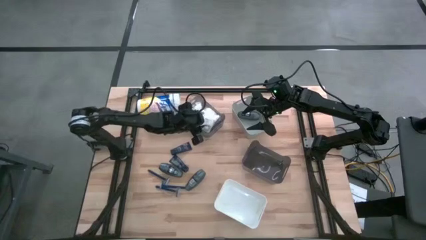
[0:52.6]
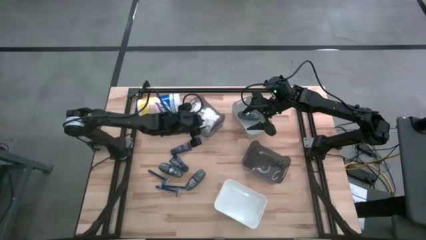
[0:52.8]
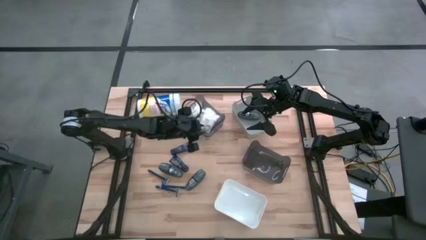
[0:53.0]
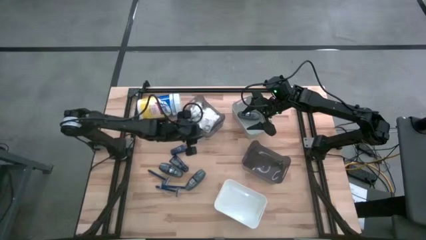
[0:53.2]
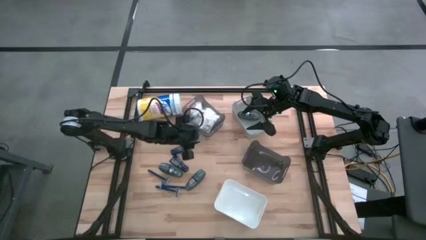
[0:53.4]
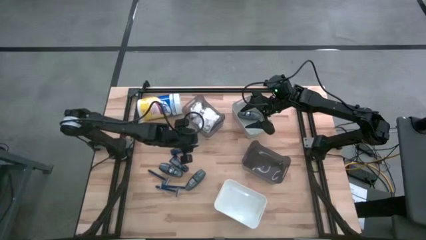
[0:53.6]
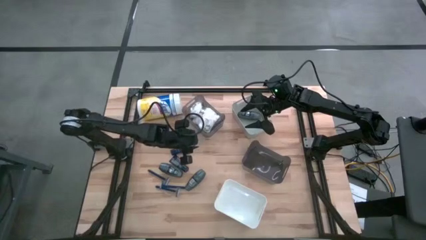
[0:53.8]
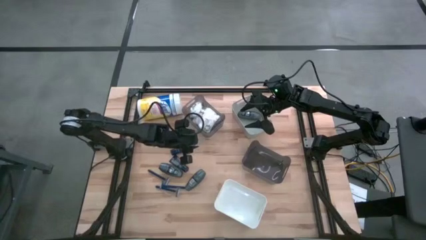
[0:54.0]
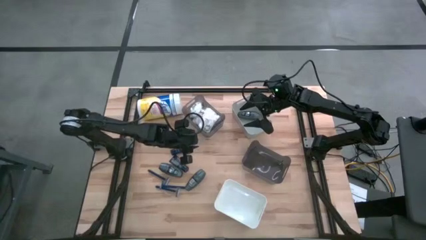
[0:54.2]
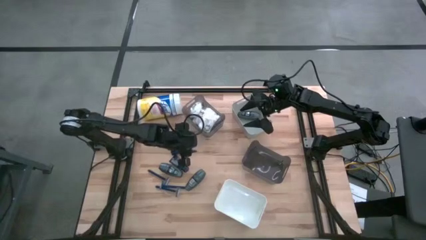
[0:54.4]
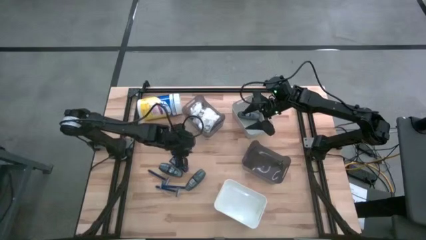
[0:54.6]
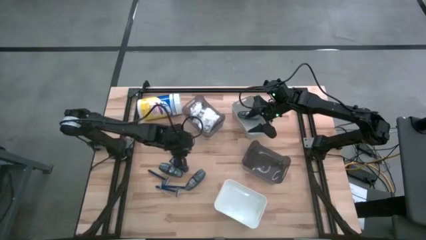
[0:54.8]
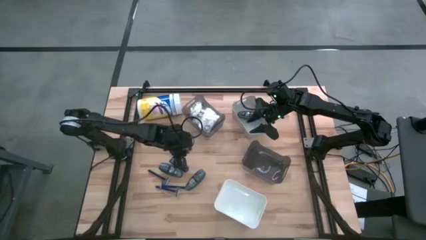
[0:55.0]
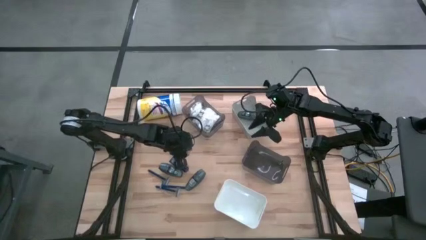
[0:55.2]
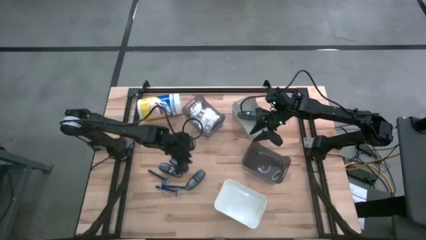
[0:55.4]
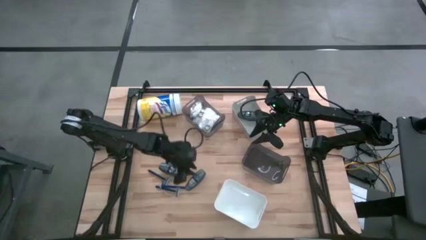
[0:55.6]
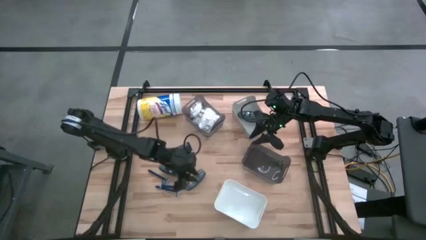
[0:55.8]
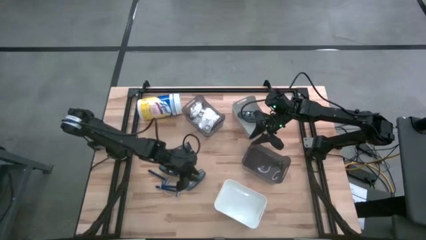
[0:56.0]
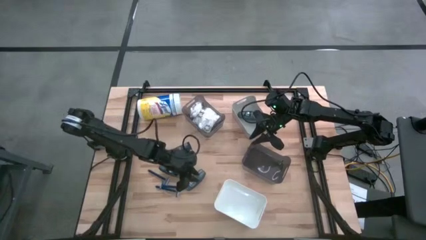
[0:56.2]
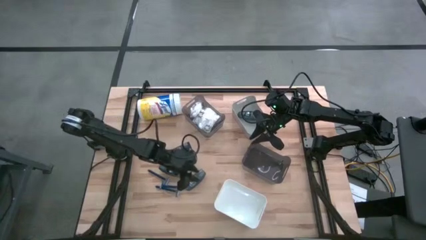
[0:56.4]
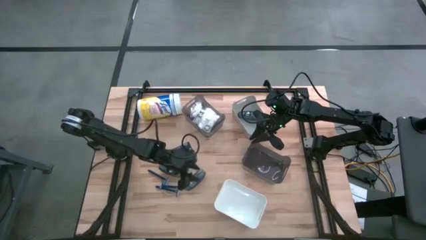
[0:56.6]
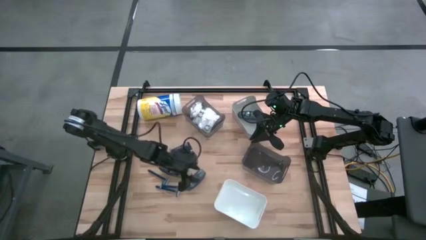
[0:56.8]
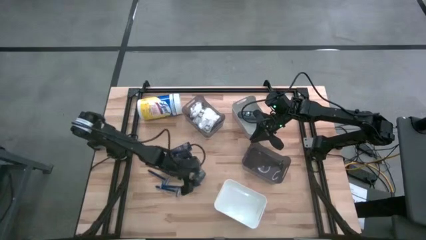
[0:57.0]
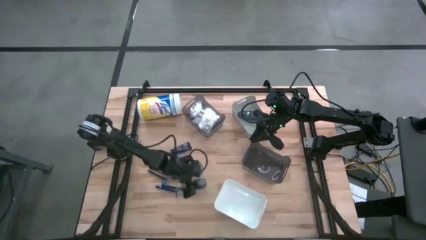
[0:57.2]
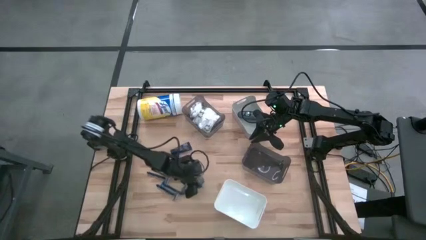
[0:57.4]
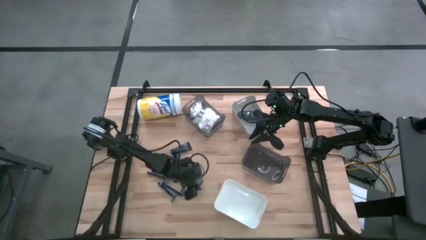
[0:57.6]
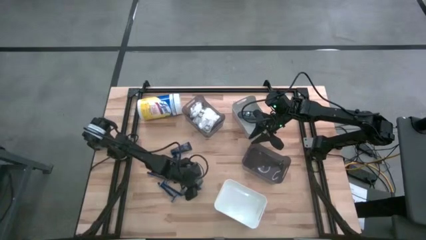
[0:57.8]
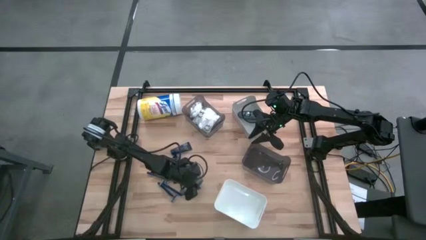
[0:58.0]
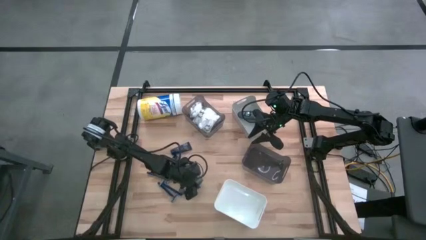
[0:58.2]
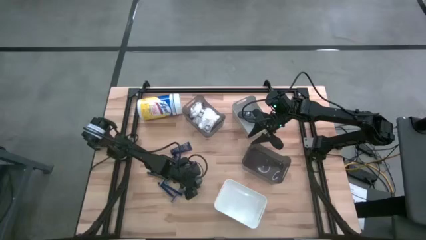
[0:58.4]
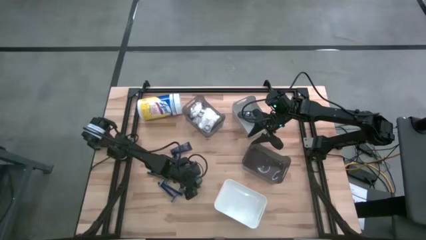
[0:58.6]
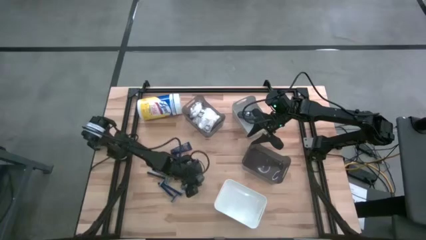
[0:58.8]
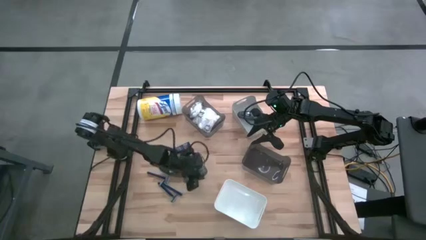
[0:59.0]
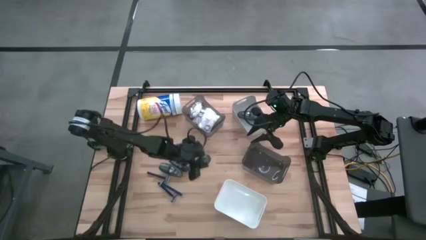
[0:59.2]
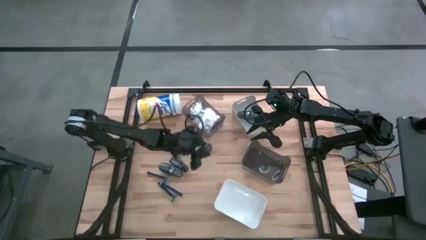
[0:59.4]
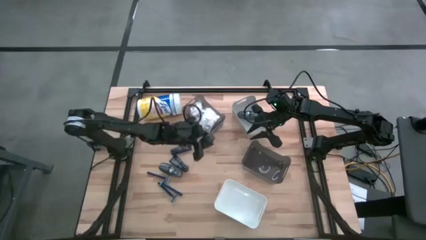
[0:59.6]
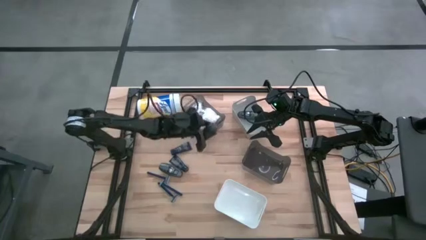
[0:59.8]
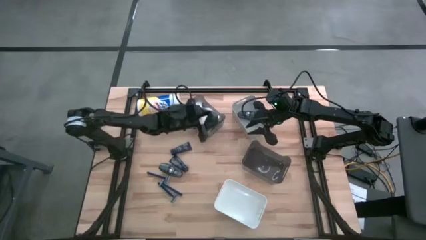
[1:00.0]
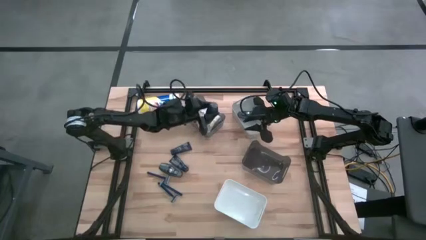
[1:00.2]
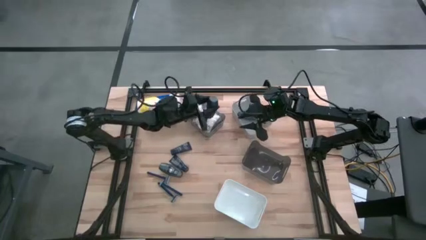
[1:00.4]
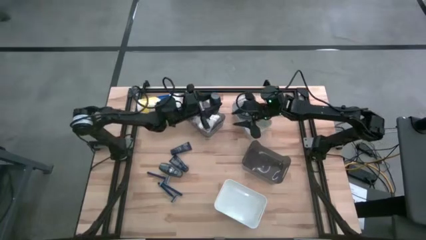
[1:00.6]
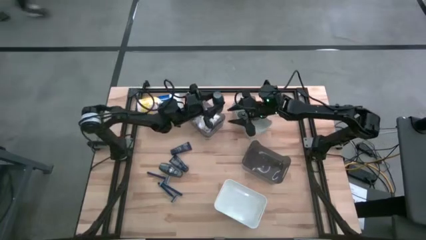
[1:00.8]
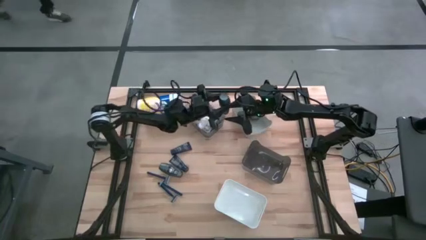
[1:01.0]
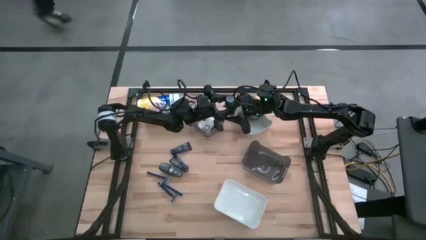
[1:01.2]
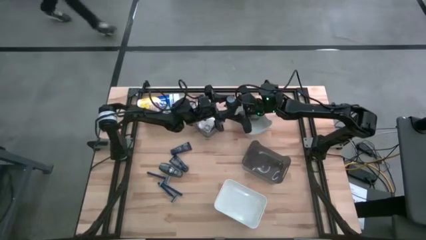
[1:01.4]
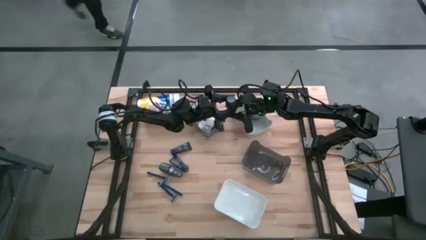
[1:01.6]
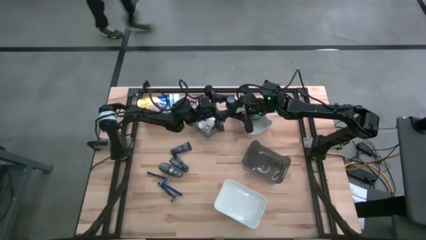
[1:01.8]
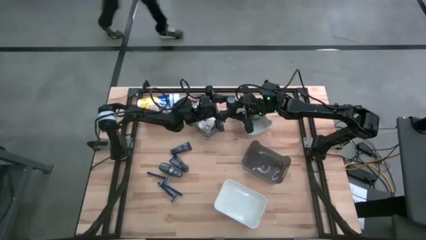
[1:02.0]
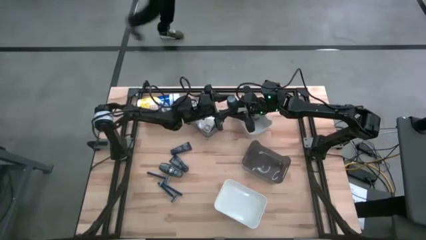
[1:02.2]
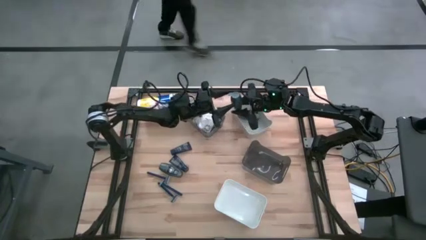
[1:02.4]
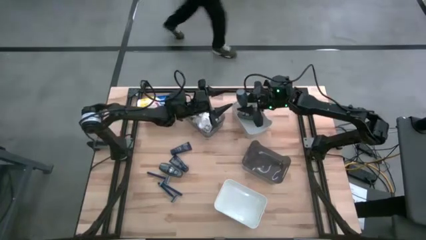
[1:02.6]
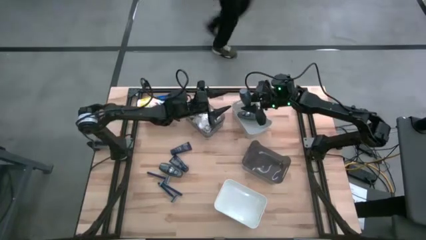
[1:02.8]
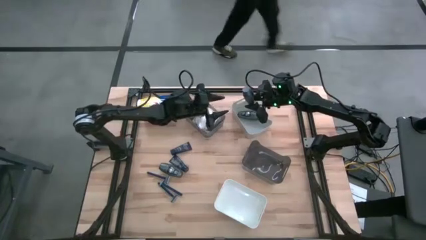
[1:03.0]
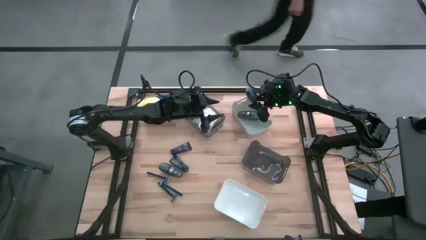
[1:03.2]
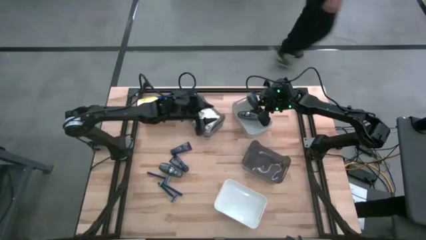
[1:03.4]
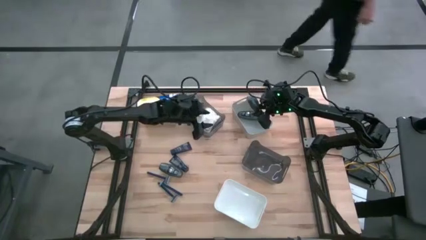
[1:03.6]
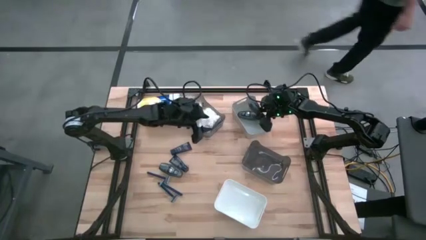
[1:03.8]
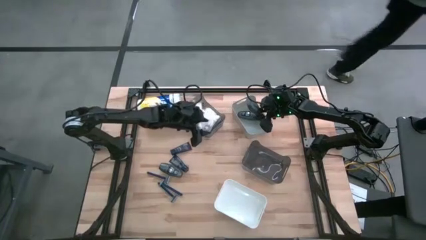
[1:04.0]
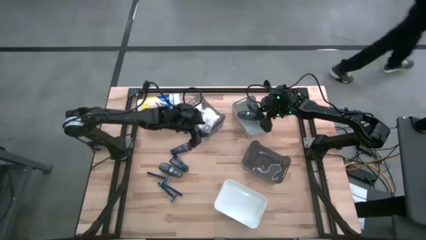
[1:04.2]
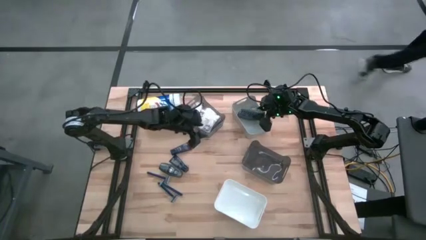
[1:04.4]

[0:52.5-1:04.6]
Task: Pick & Place Travel size toiletries
Put the gray deodorant into the gray bin

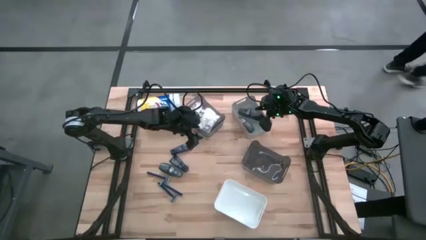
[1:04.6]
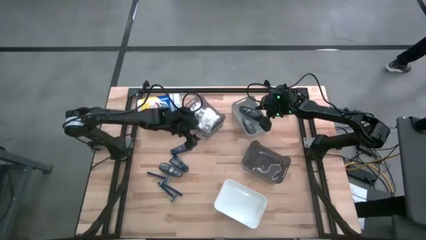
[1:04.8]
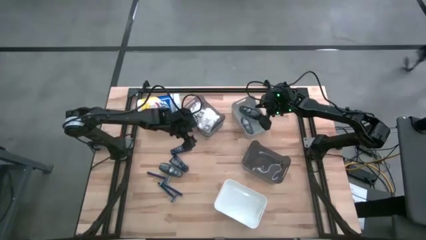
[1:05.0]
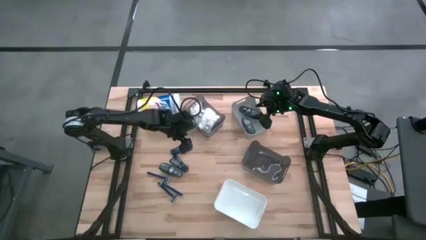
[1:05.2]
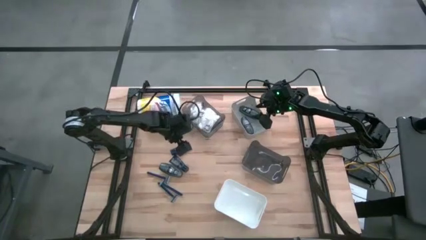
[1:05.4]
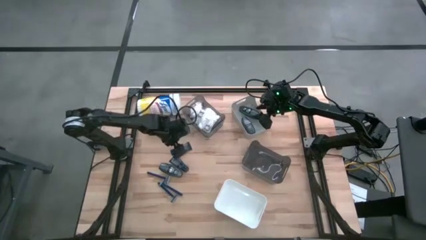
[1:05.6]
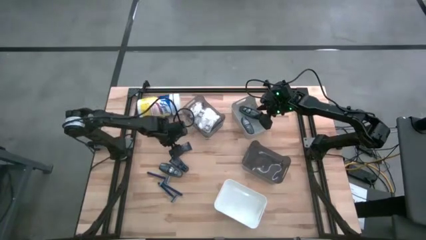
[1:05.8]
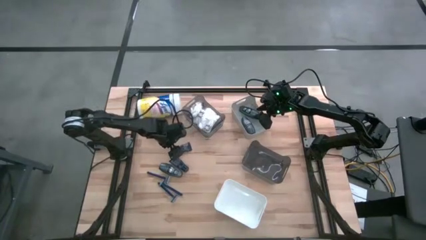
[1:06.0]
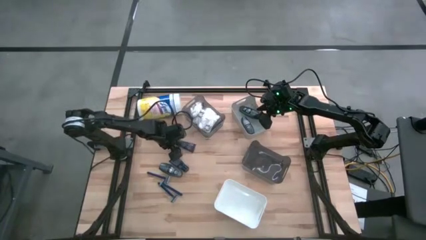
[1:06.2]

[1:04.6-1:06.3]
Put the blue shave cream into the bottom black bin

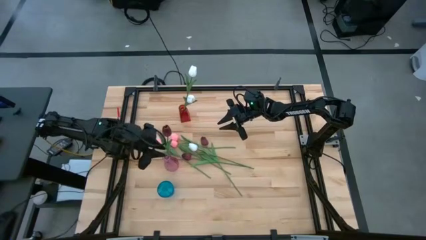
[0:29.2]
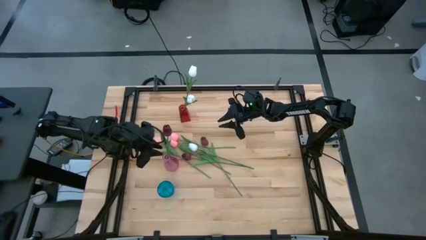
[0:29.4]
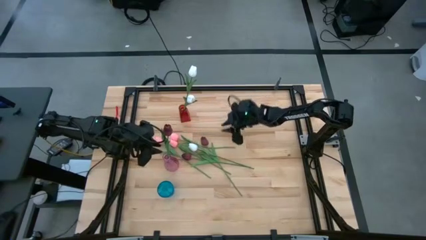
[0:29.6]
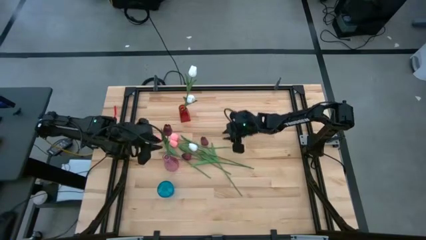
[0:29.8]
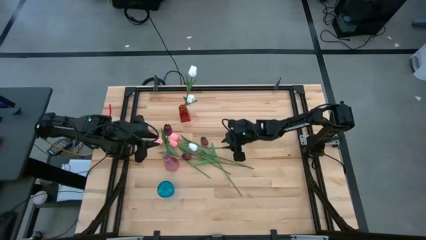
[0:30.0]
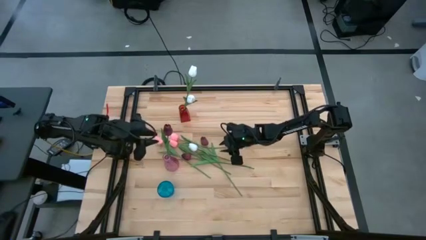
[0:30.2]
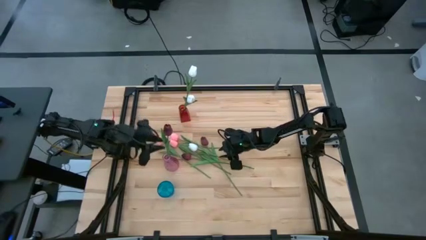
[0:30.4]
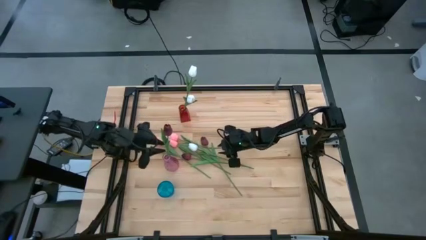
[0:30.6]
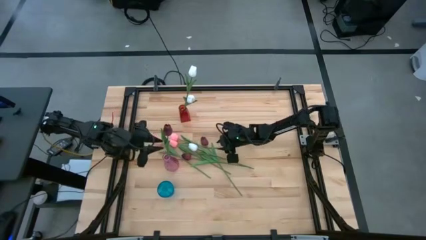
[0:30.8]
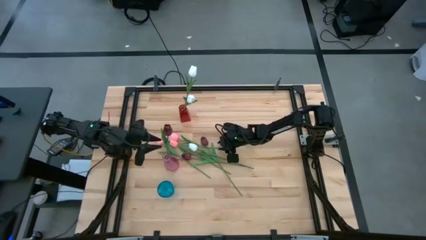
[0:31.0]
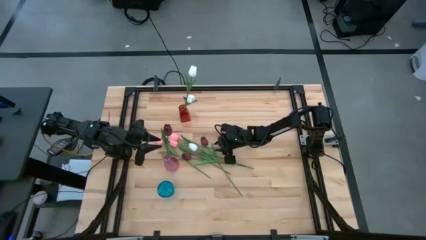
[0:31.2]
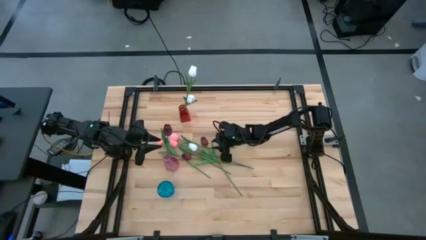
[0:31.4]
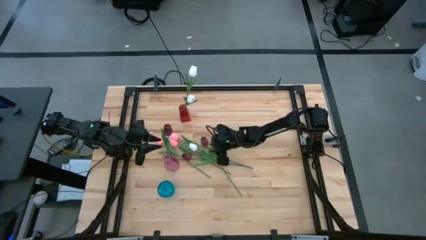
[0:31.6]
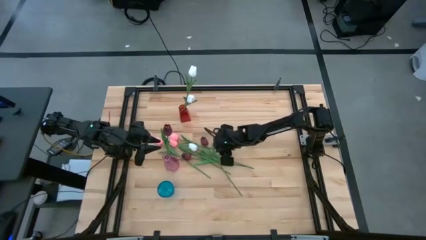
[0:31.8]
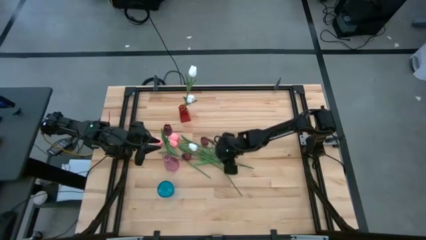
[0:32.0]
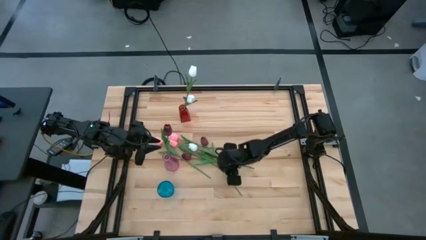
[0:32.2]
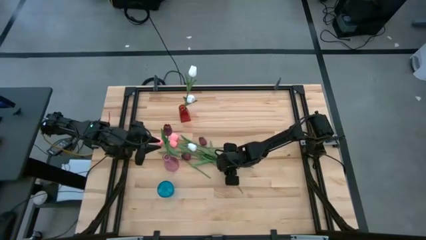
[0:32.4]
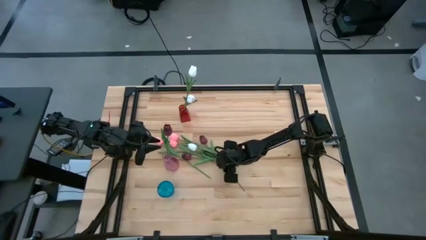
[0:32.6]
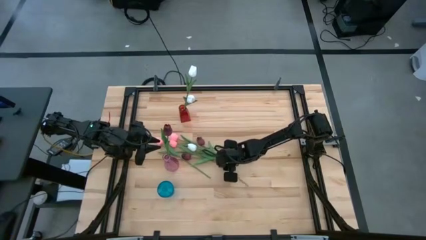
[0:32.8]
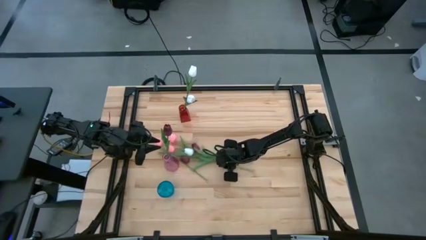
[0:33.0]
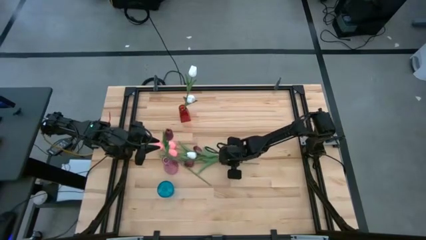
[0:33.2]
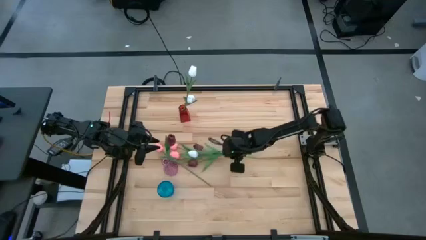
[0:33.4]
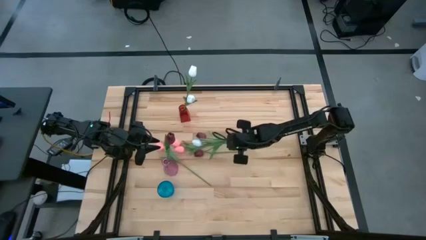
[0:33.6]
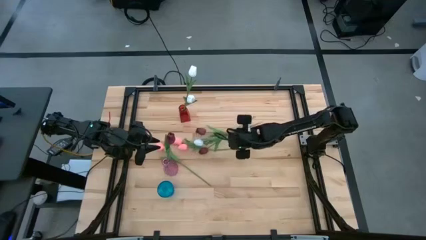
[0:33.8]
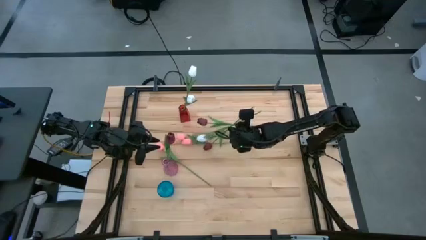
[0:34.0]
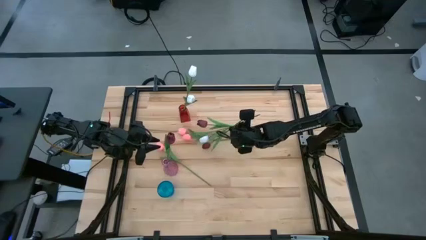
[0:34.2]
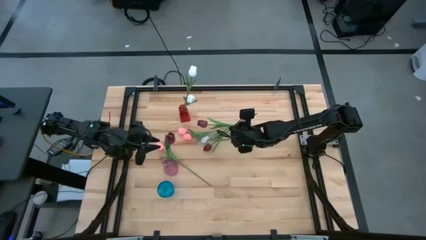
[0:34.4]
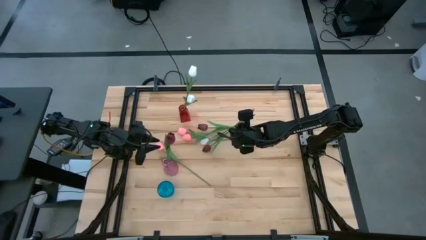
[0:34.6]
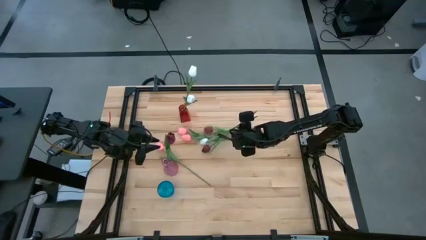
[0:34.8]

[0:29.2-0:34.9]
Task: Sort flowers into vase by color
Put the right dark red tulip into the pink vase
